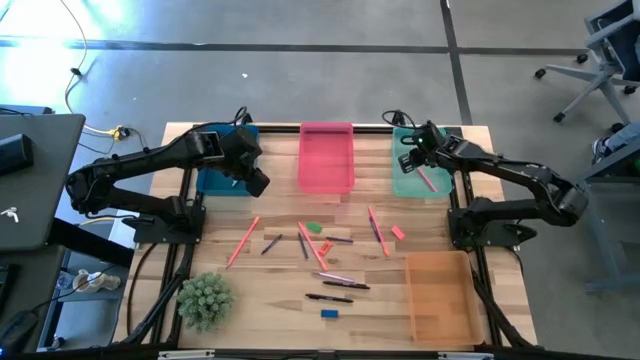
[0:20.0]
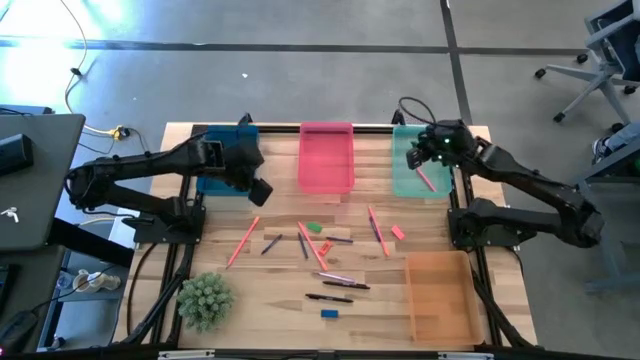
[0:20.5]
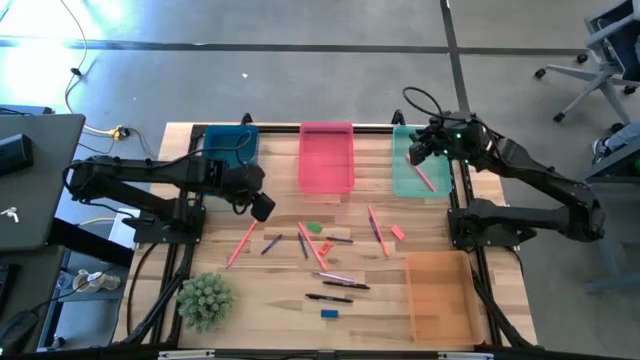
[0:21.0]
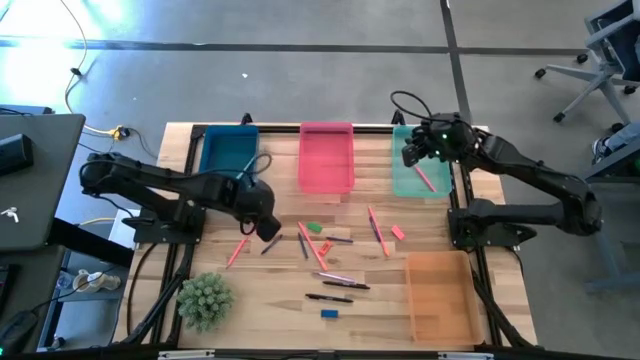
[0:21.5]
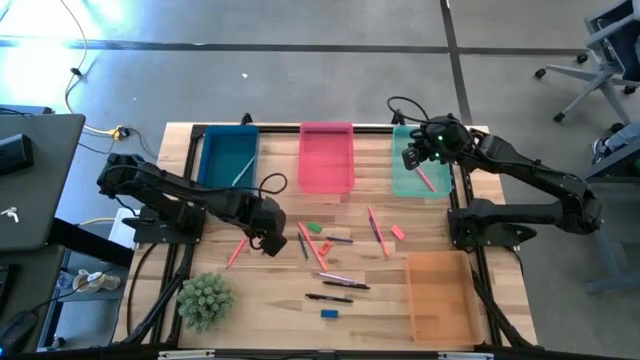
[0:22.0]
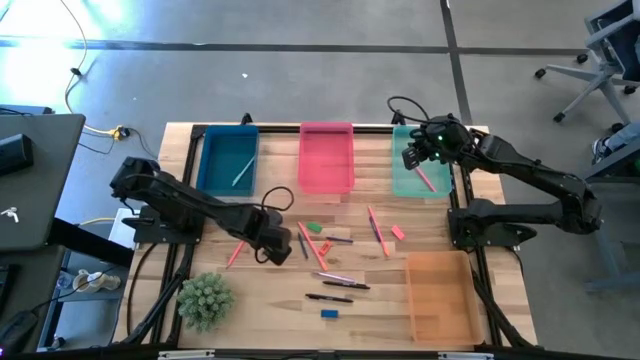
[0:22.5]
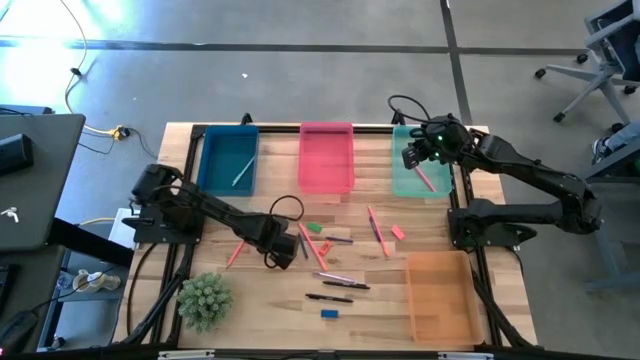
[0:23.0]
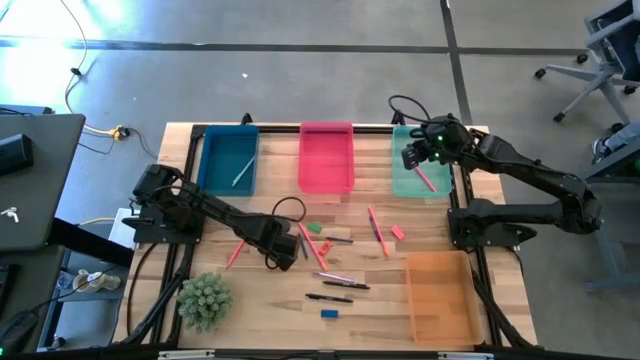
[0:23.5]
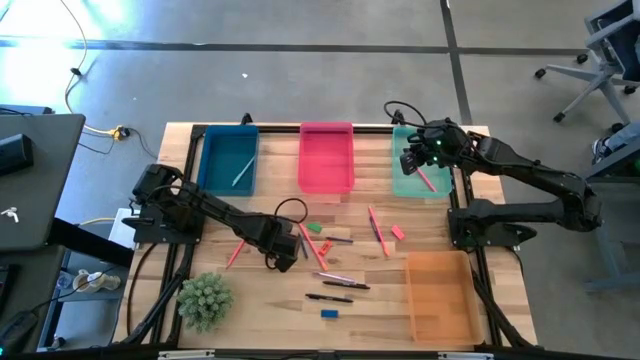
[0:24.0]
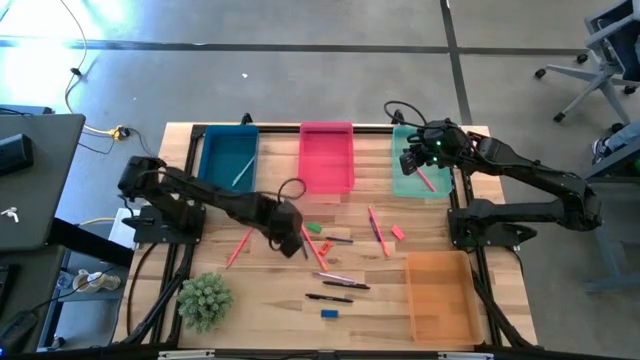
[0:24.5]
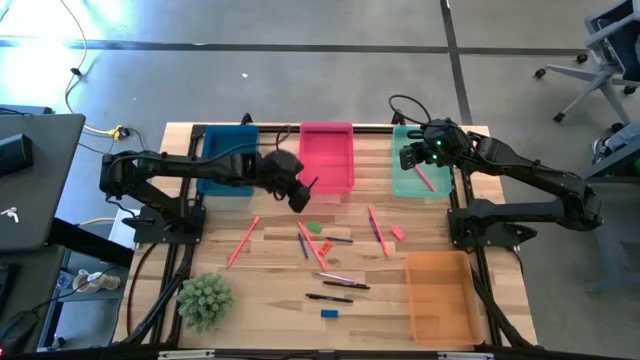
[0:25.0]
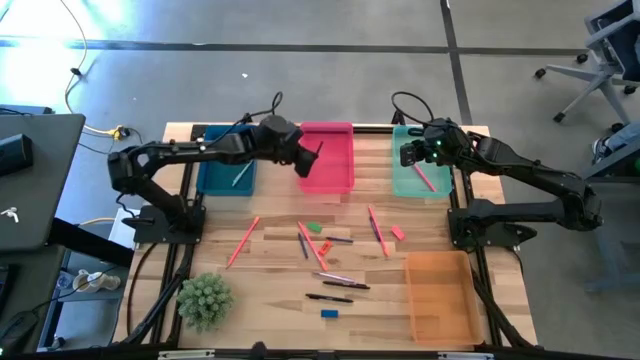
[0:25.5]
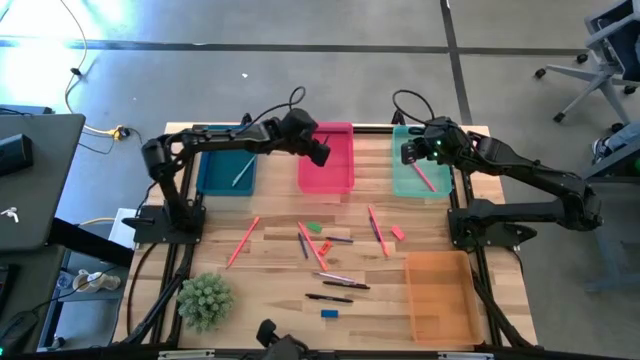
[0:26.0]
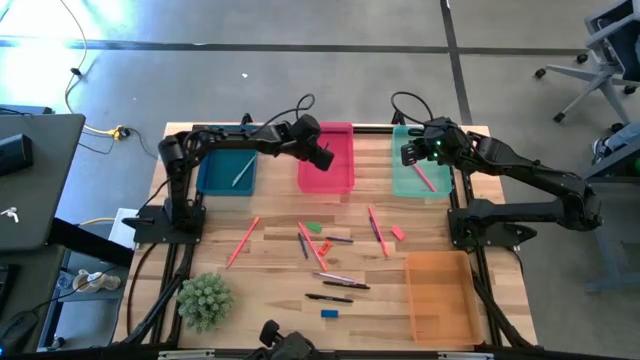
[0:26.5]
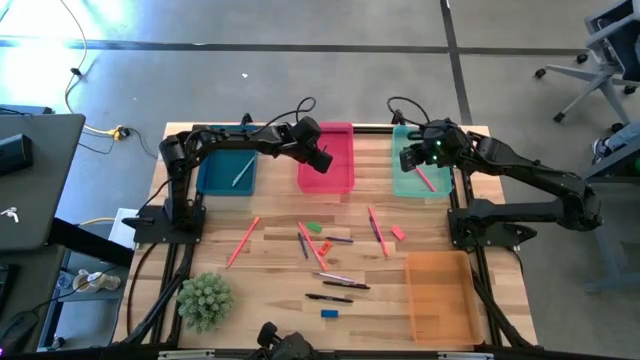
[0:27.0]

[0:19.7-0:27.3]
Task: Sort crayons/erasers/pens/pencils in bins
Put the blue crayon into the pink bin

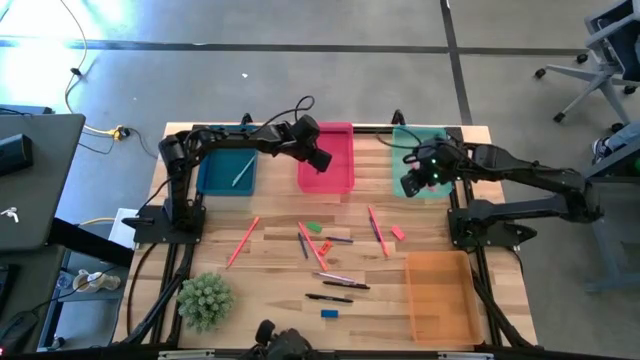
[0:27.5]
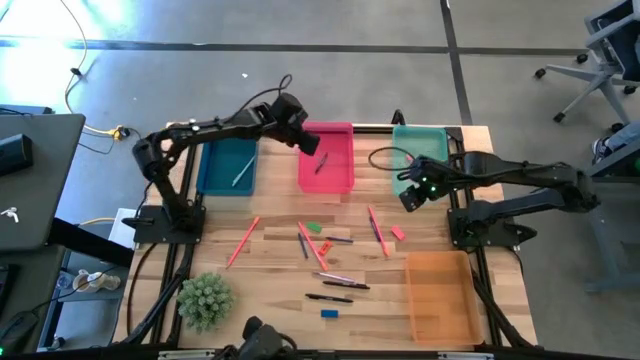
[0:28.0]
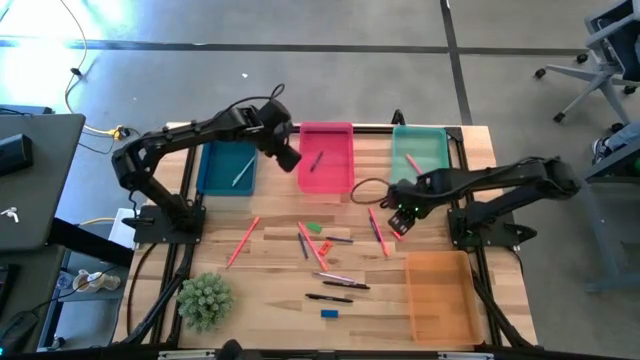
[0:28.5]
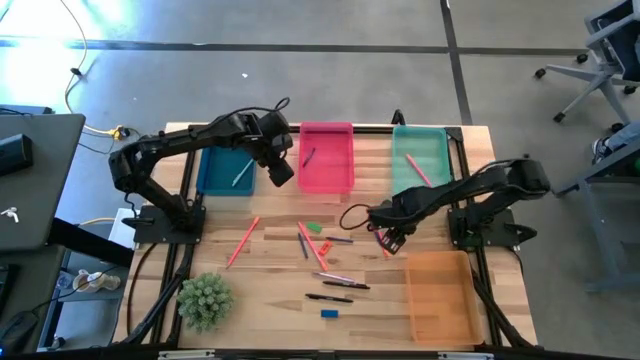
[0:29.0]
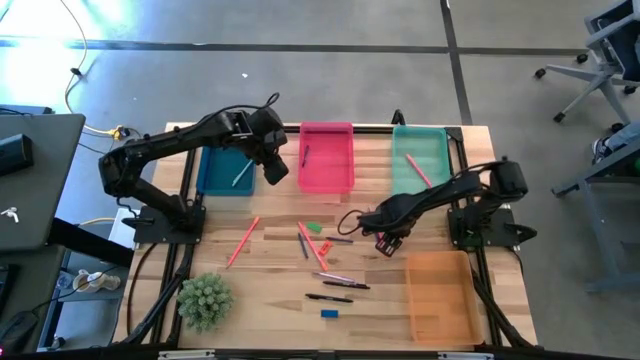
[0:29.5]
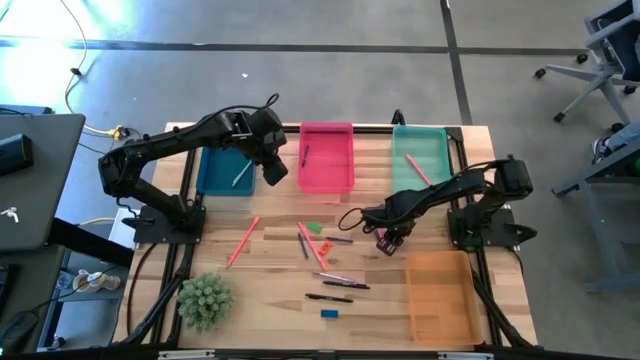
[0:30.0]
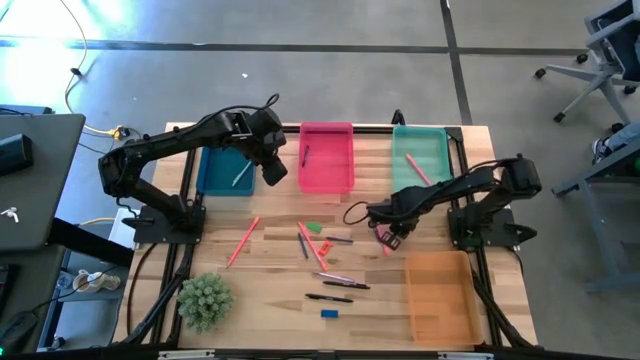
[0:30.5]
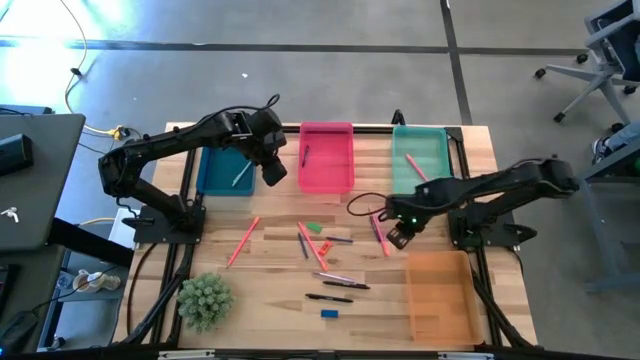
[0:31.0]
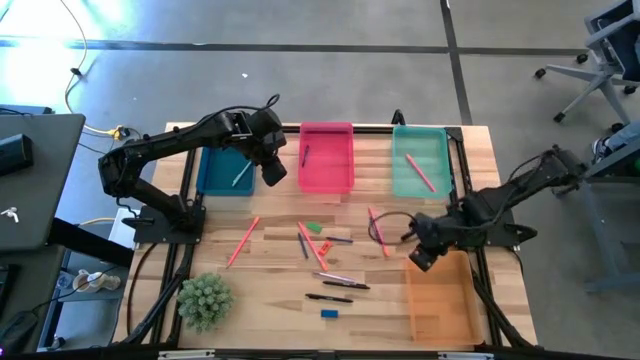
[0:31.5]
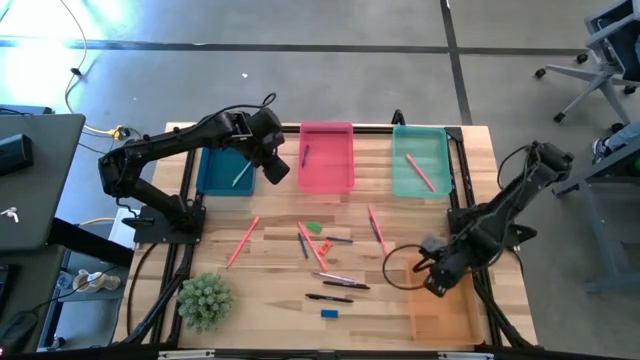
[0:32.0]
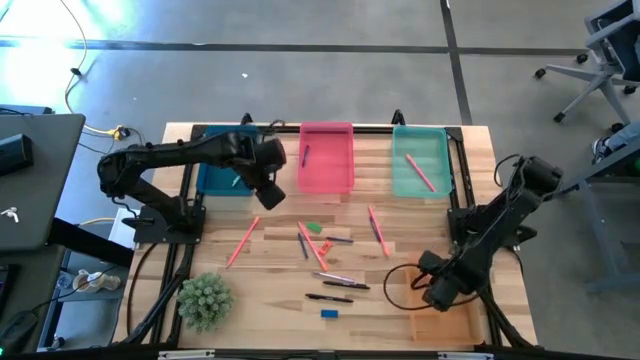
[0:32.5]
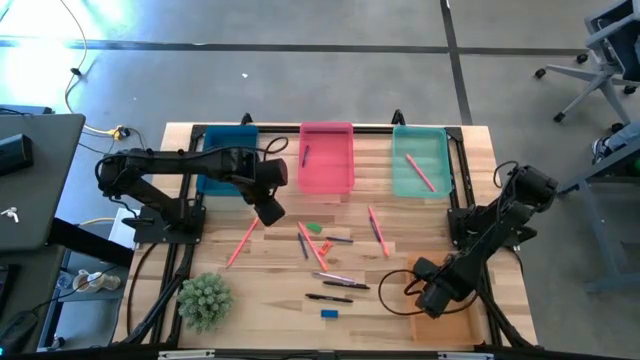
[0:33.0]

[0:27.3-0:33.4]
Put the pink eraser into the orange bin

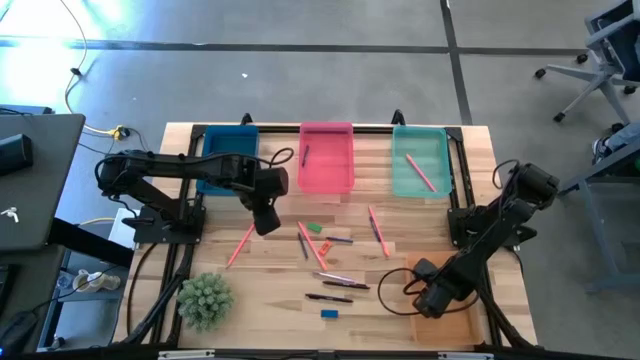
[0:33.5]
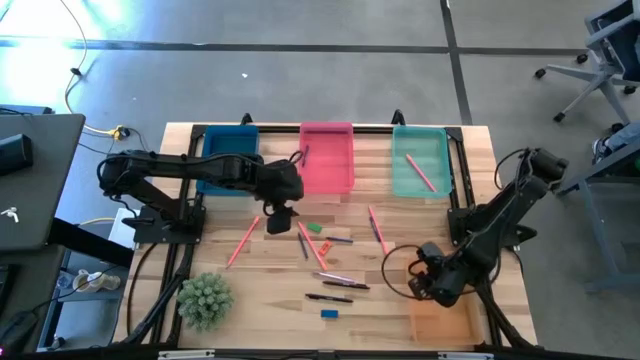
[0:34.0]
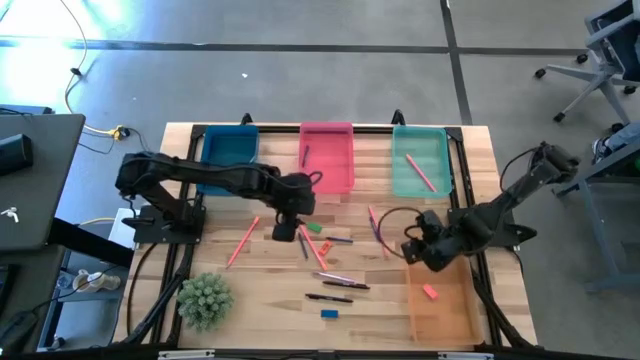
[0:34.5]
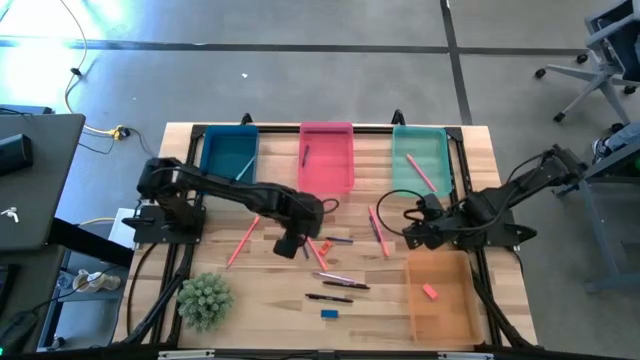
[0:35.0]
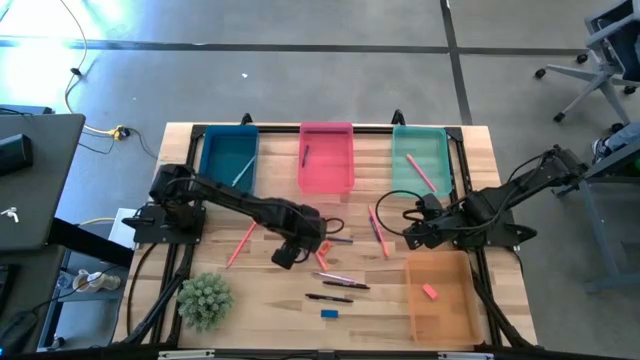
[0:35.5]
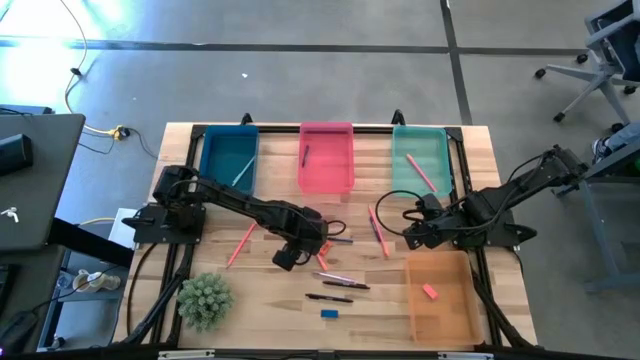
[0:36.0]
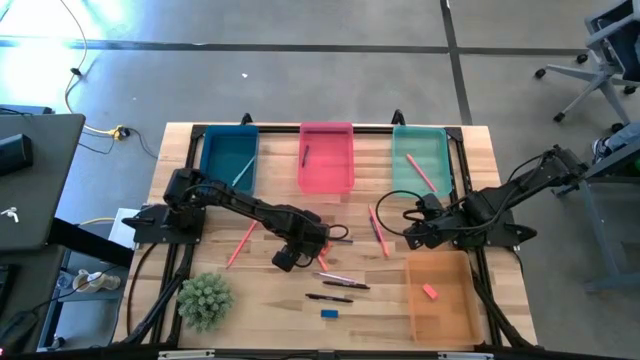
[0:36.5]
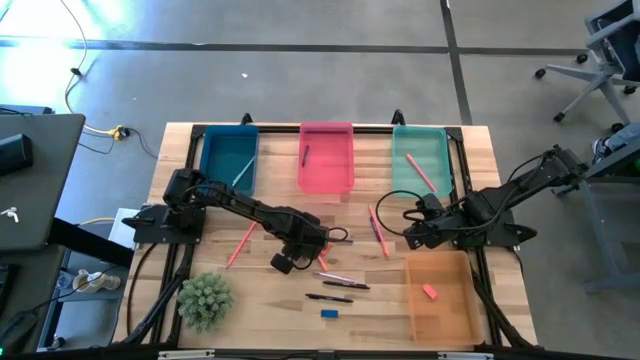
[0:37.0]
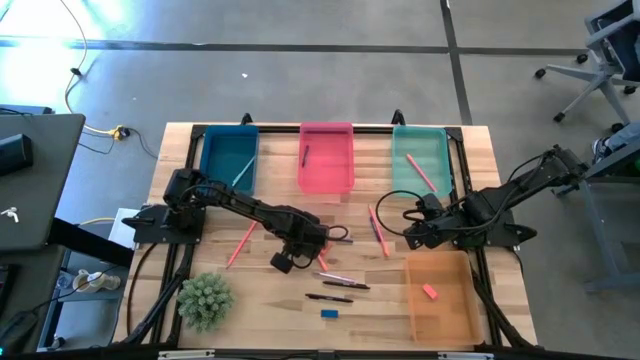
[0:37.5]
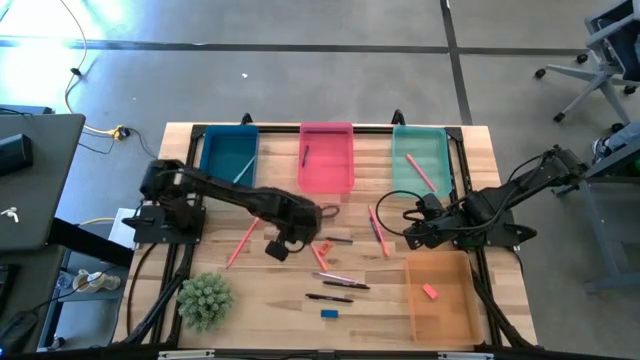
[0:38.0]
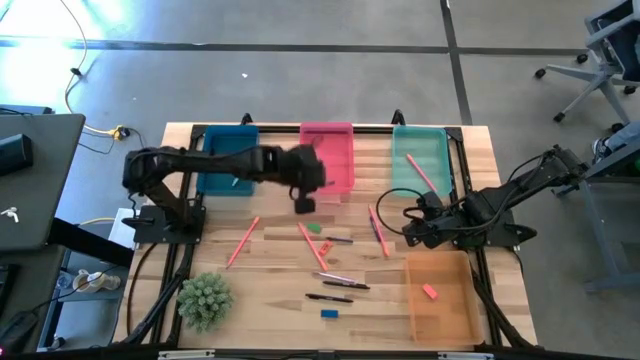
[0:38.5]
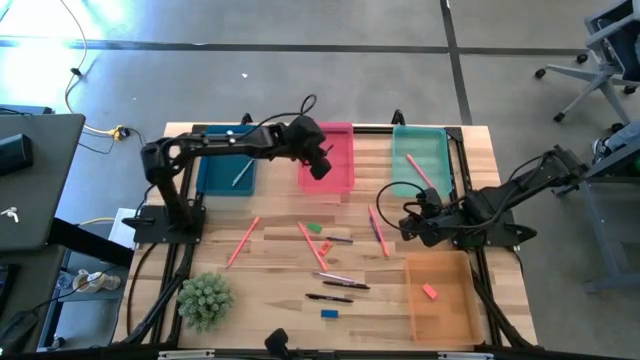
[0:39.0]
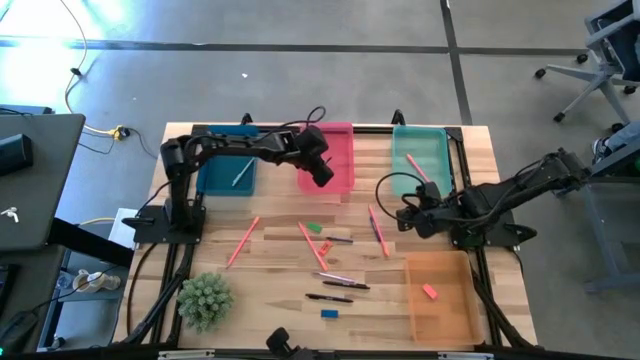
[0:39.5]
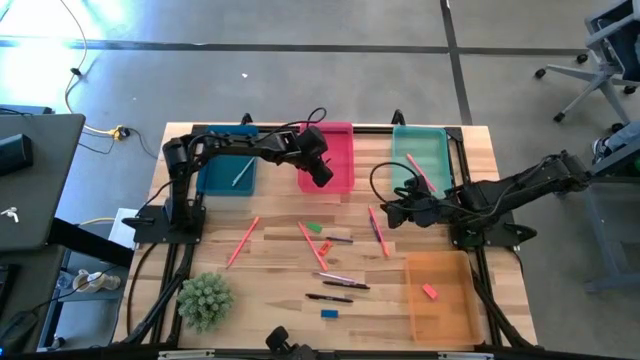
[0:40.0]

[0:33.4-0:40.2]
Put the blue crayon into the pink bin

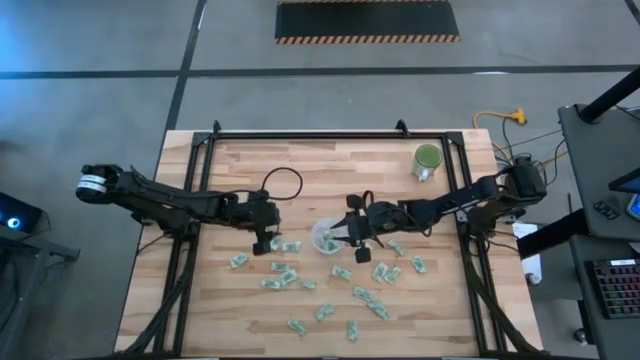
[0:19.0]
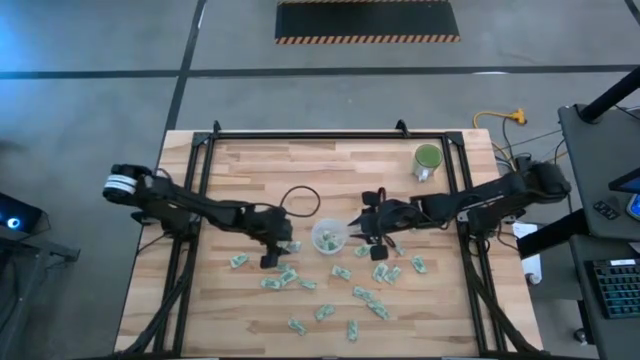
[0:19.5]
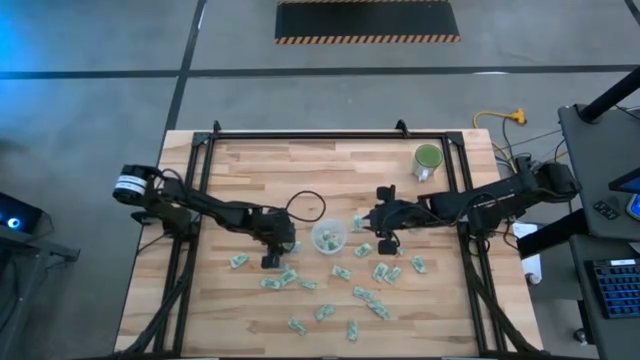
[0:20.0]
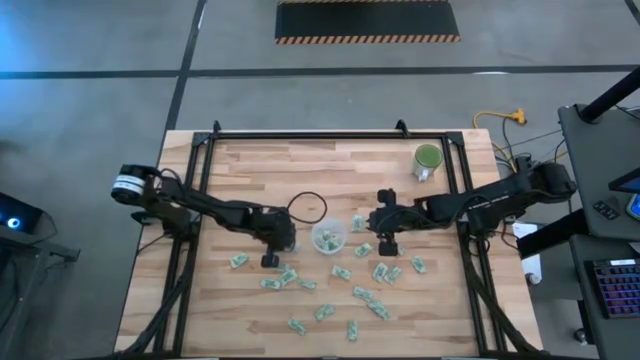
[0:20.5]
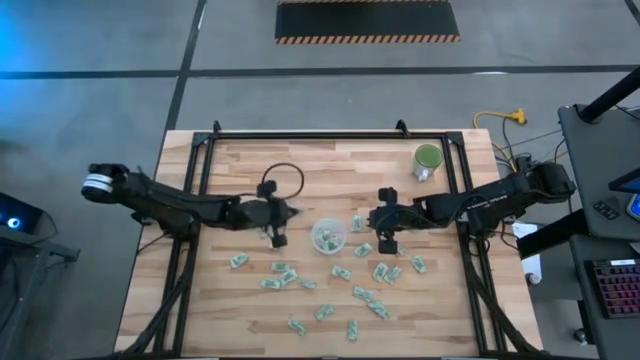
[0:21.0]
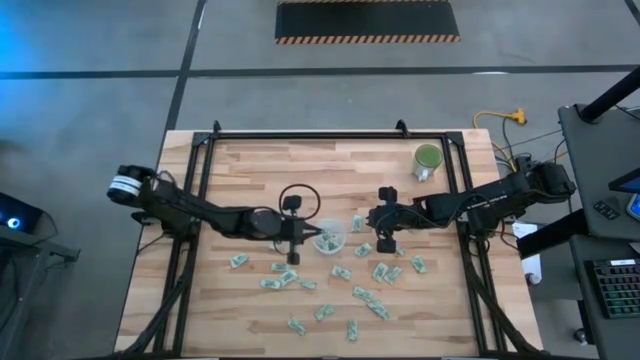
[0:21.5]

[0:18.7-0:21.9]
Task: Pick and place Stevia / Truvia into bins
Put the light green stevia packet into the transparent container
